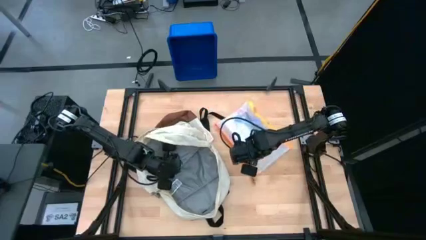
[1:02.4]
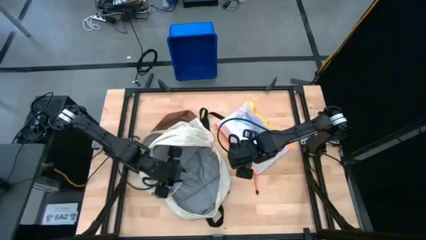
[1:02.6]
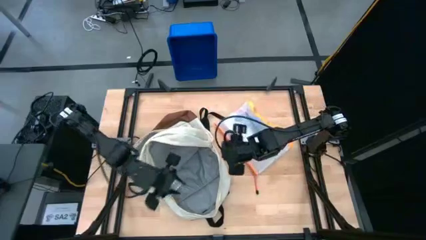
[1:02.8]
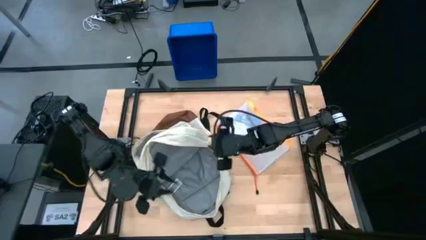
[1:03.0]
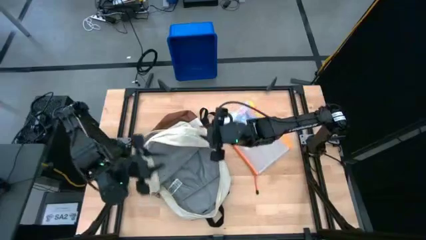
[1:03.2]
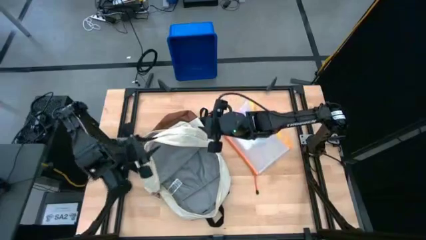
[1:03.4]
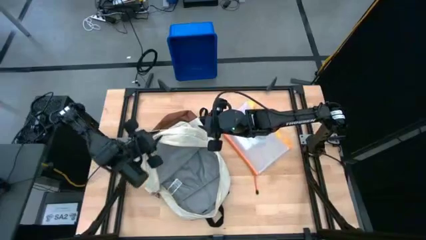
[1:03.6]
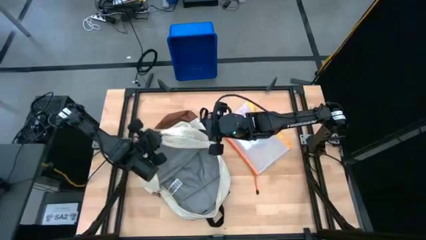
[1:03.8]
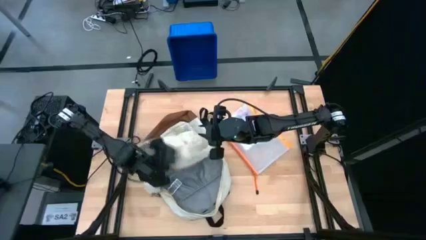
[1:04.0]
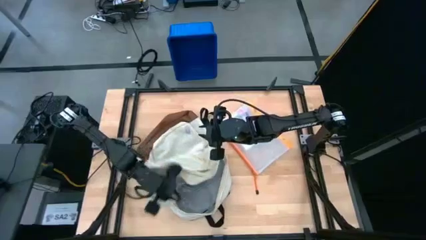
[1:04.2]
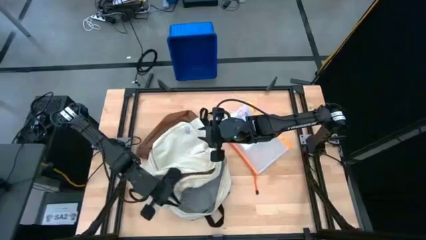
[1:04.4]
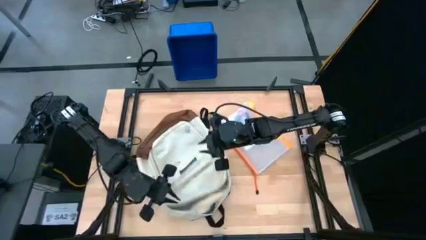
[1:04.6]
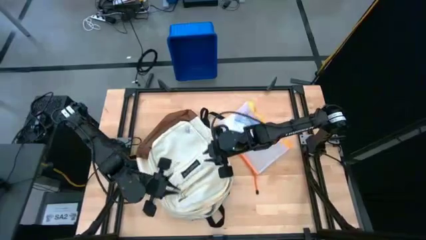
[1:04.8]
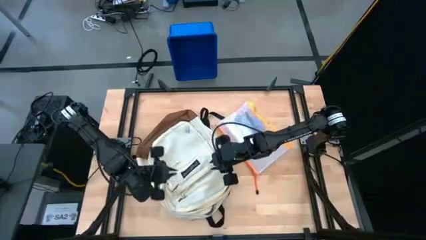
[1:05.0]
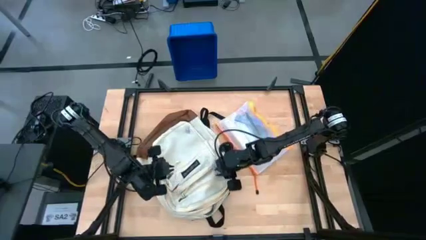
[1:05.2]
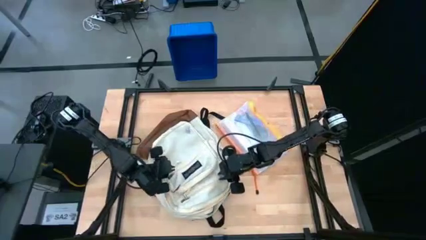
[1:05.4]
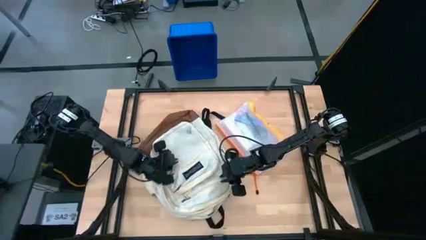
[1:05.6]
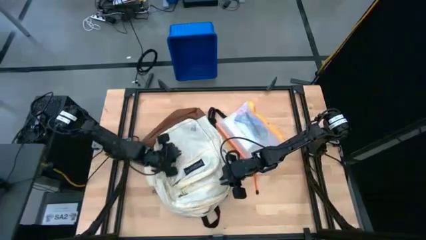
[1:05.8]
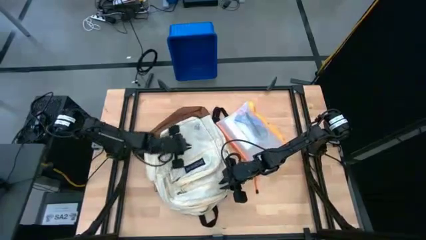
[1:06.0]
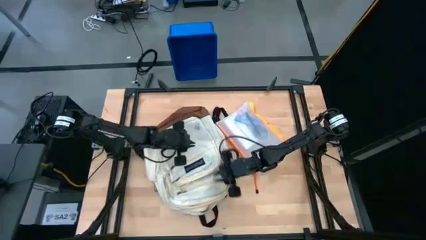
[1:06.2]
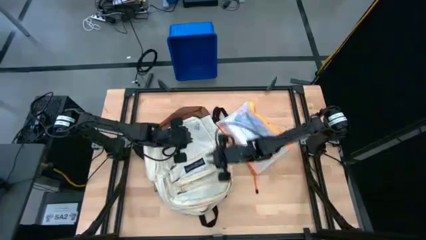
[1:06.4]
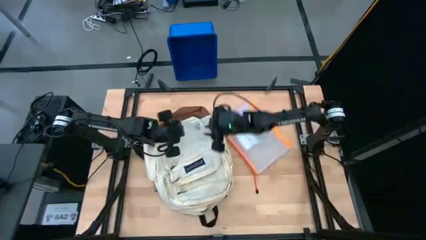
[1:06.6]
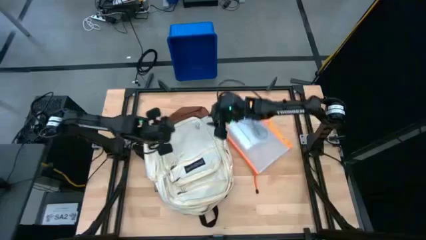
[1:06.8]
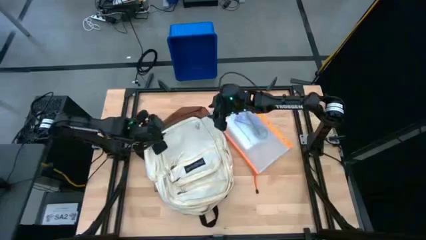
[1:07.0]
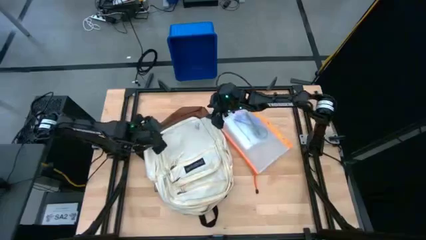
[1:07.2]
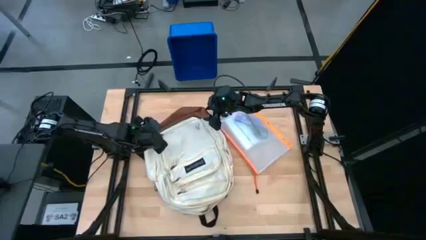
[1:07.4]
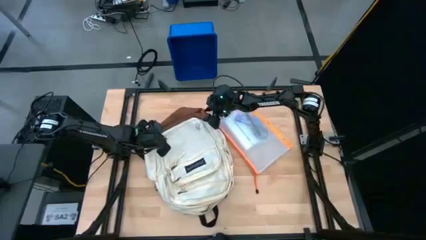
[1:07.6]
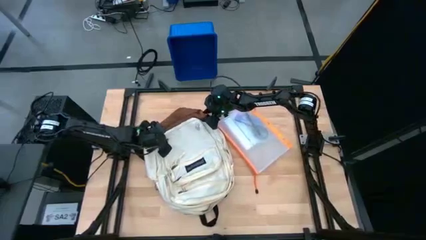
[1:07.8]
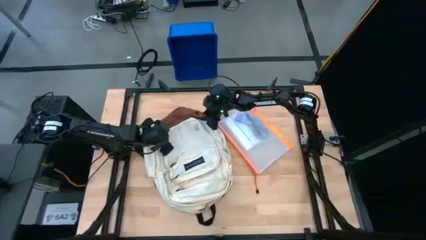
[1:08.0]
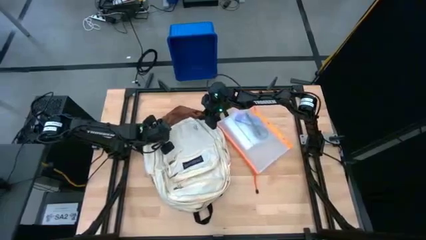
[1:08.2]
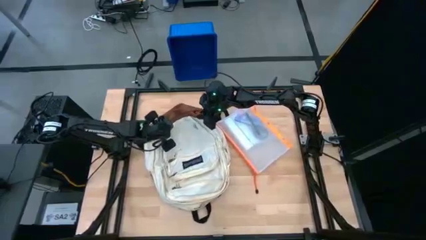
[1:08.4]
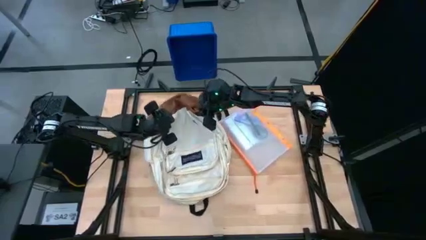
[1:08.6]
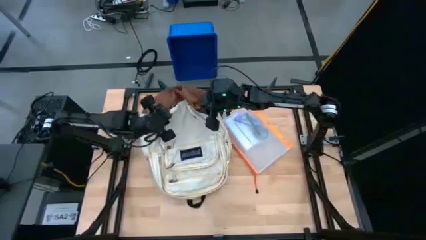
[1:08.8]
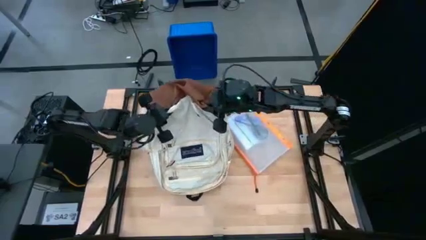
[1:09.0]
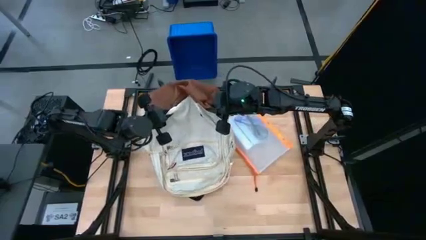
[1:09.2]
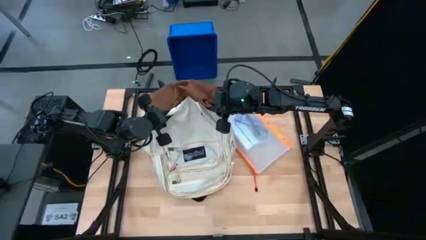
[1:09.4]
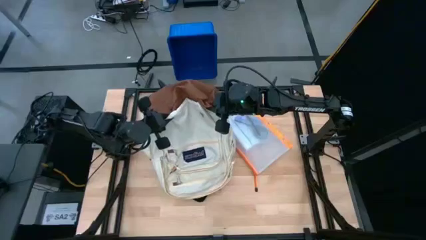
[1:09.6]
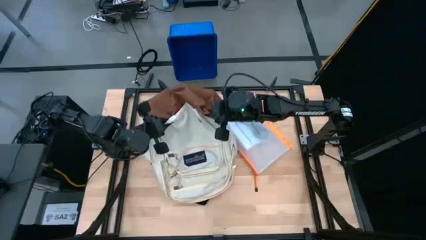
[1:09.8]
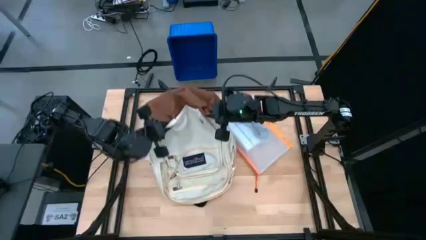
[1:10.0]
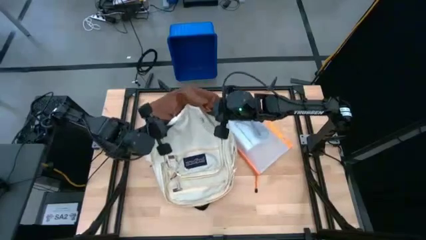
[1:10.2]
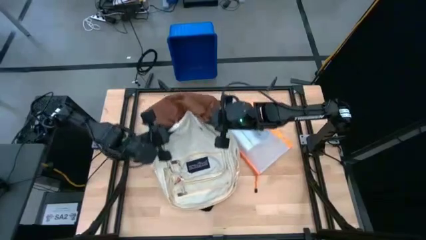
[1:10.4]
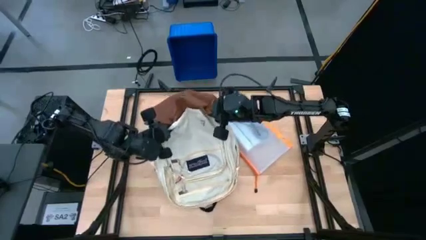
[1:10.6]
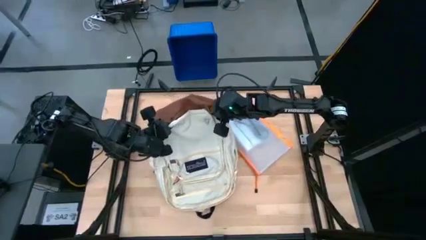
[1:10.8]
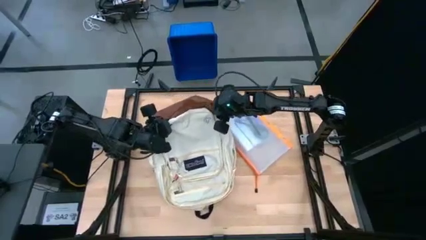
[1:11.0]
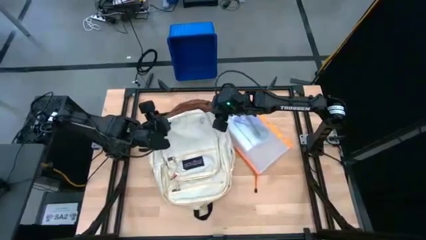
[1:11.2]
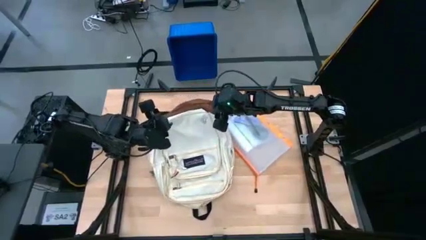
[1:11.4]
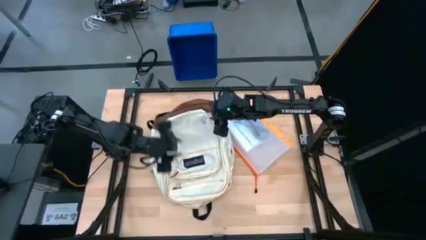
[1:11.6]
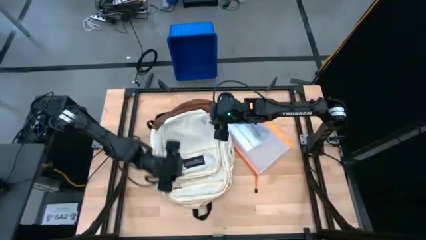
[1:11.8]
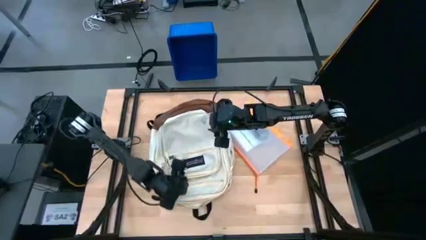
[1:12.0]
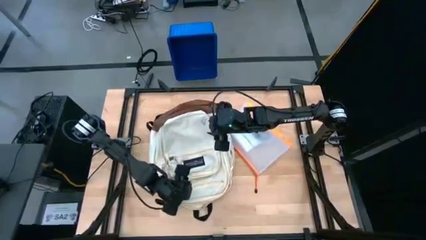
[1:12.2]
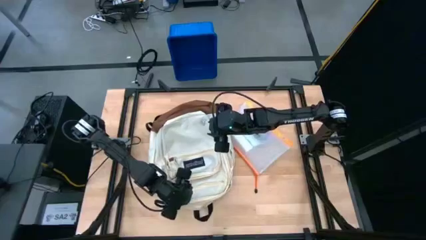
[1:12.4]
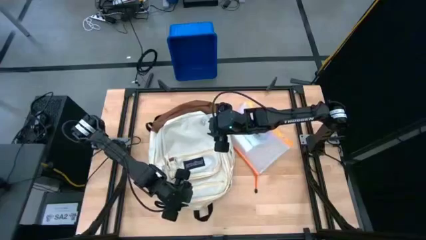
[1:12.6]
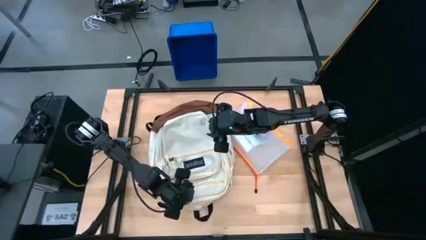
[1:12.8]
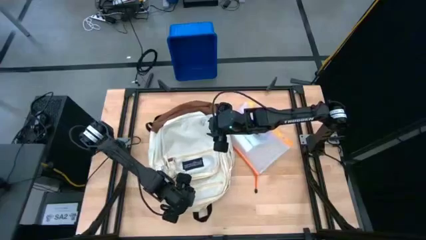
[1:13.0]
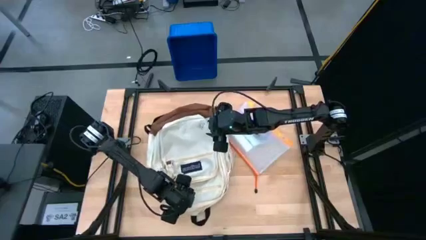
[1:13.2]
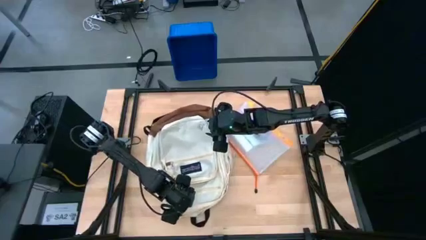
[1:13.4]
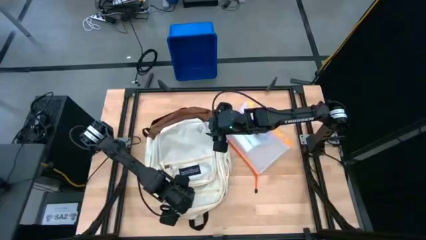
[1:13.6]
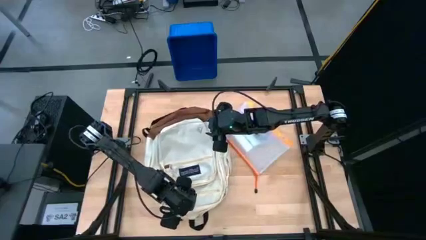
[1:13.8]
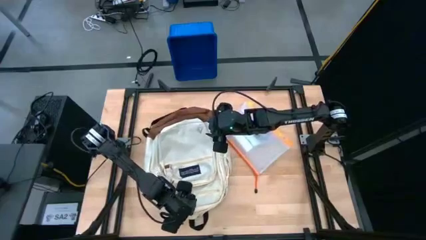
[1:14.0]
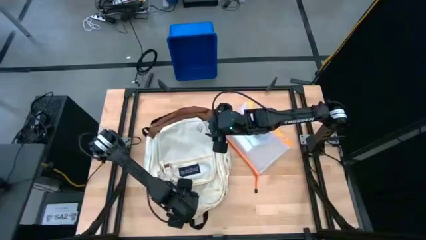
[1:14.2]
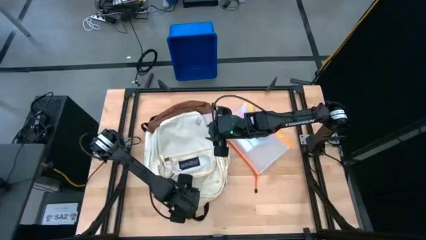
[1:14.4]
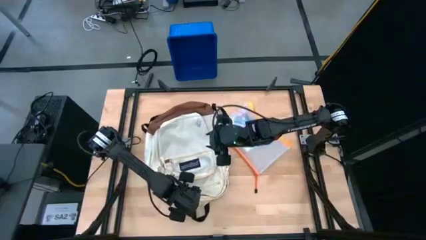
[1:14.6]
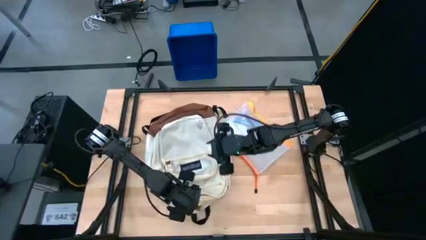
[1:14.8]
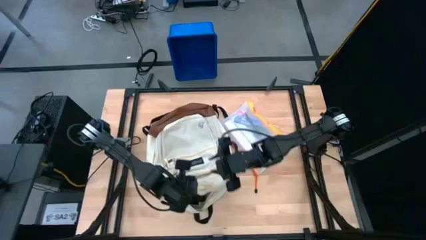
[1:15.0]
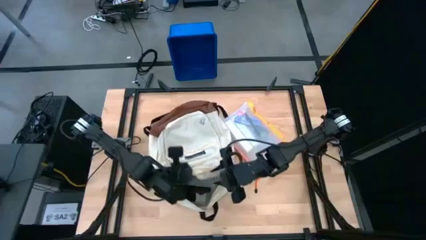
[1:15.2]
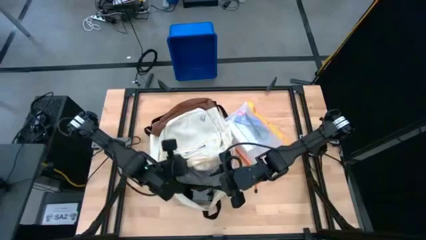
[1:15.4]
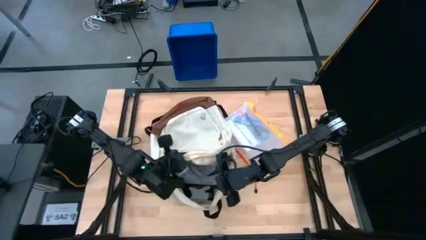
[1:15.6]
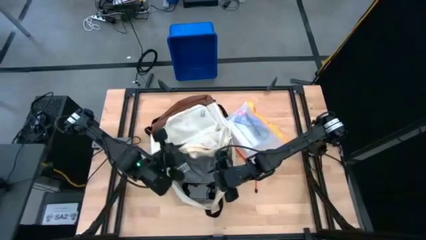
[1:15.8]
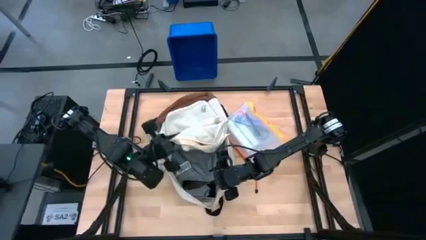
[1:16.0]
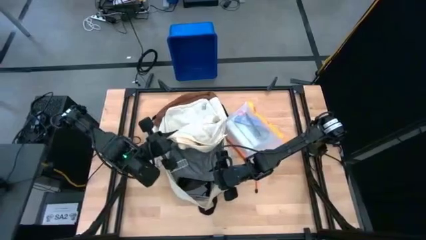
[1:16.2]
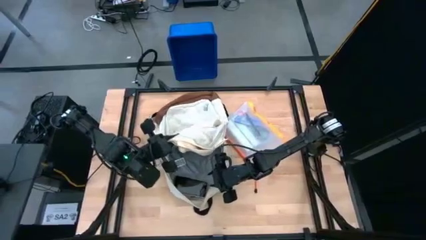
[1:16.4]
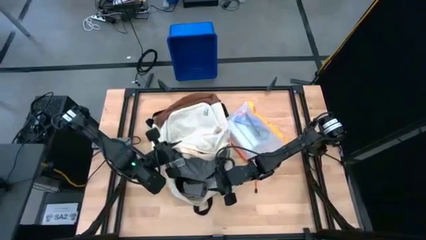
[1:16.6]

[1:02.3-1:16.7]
Task: Unpack backpack
Remove the pink cellphone from the white backpack
